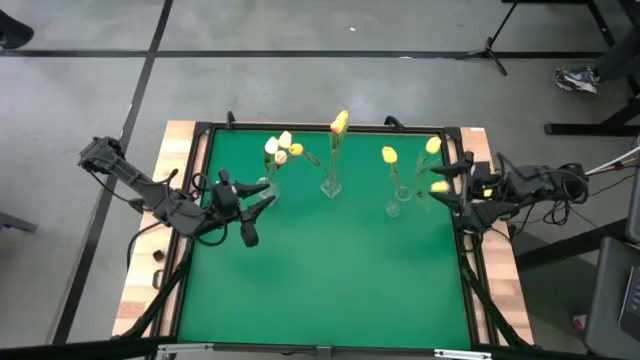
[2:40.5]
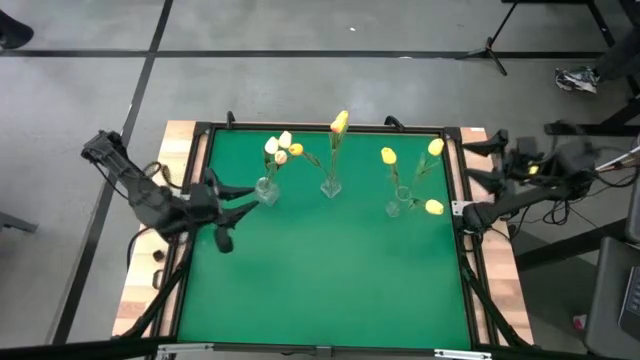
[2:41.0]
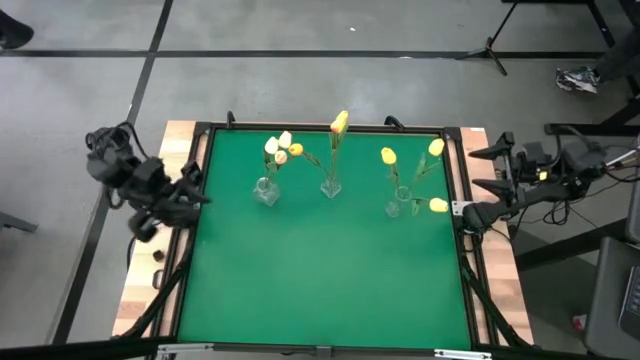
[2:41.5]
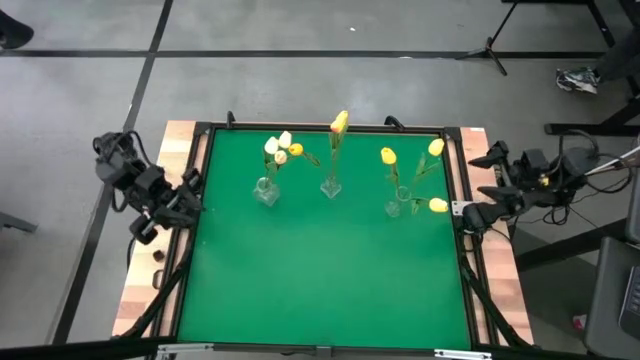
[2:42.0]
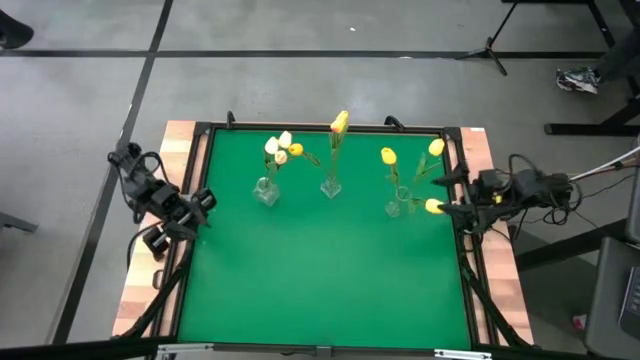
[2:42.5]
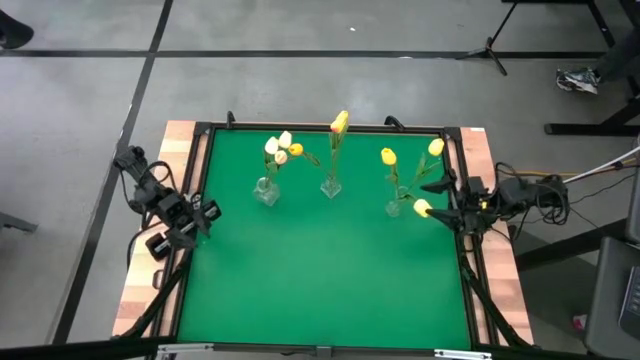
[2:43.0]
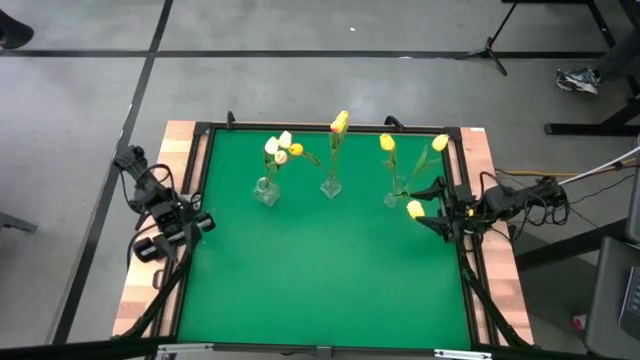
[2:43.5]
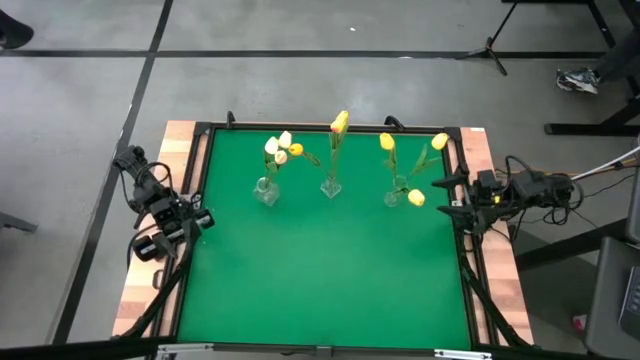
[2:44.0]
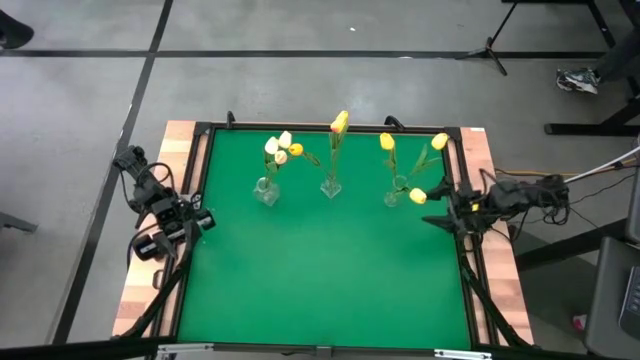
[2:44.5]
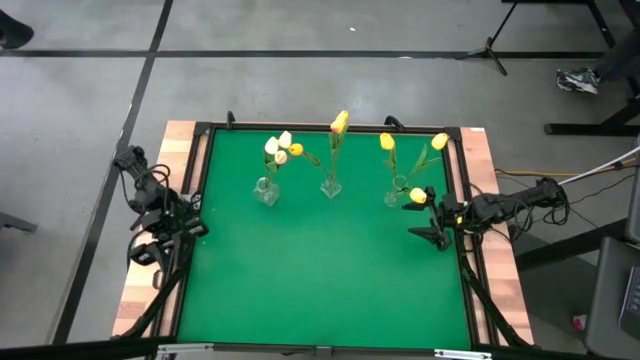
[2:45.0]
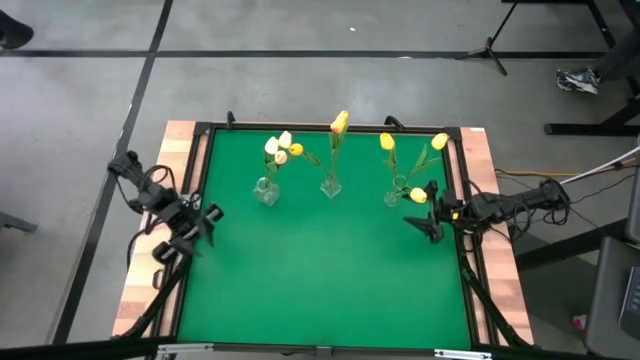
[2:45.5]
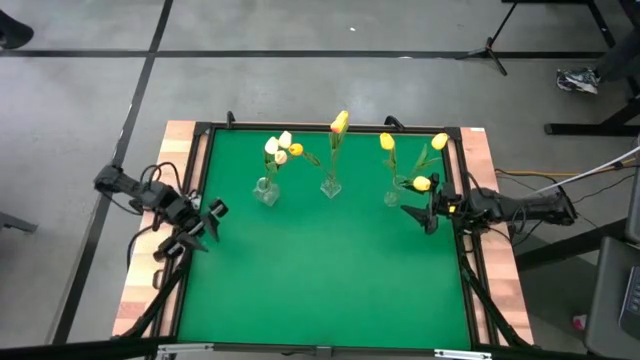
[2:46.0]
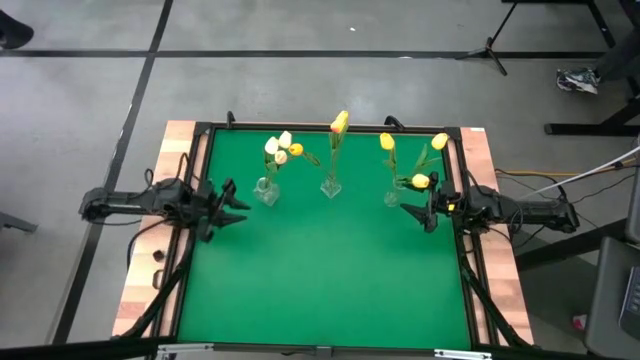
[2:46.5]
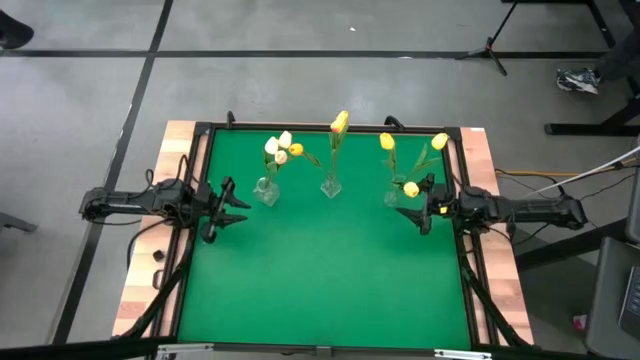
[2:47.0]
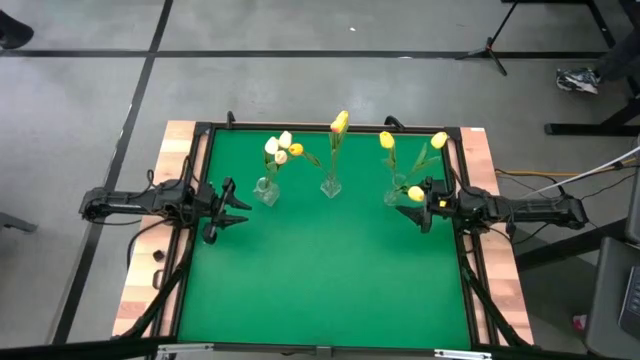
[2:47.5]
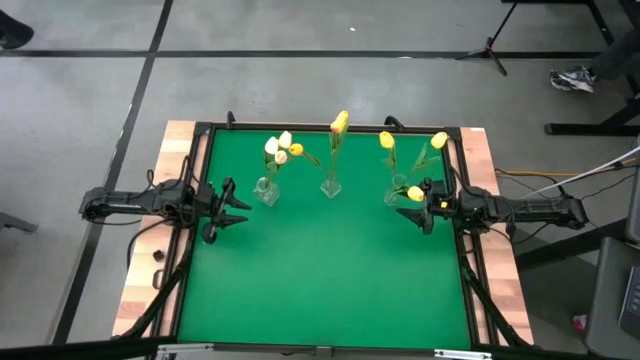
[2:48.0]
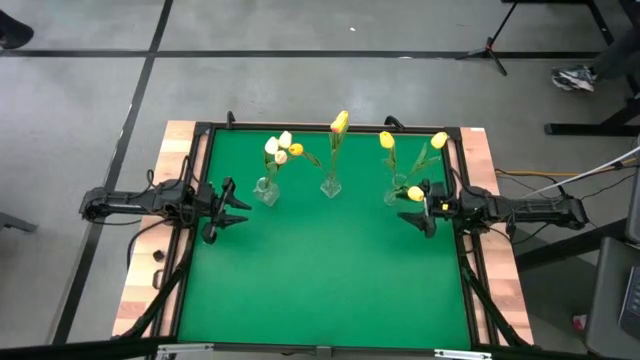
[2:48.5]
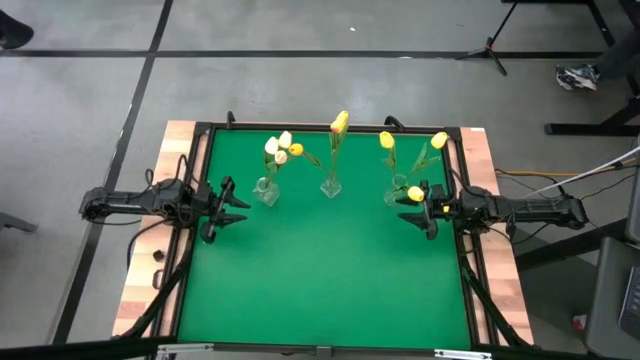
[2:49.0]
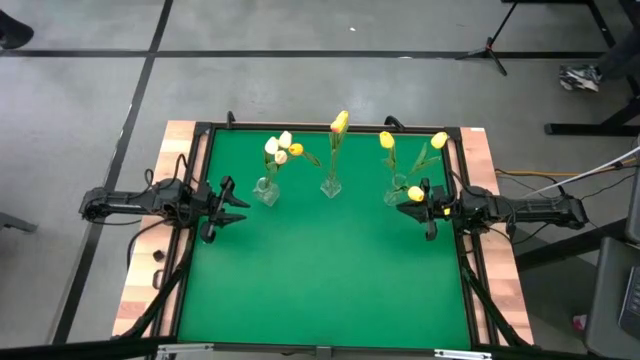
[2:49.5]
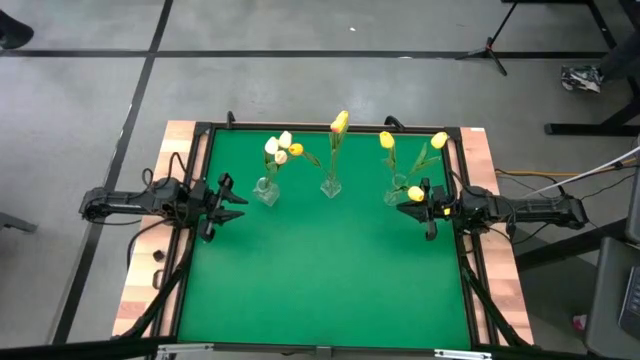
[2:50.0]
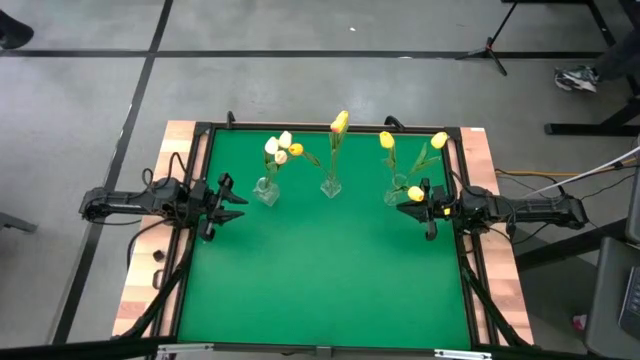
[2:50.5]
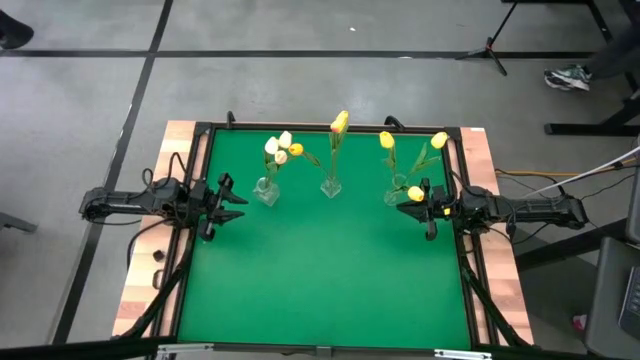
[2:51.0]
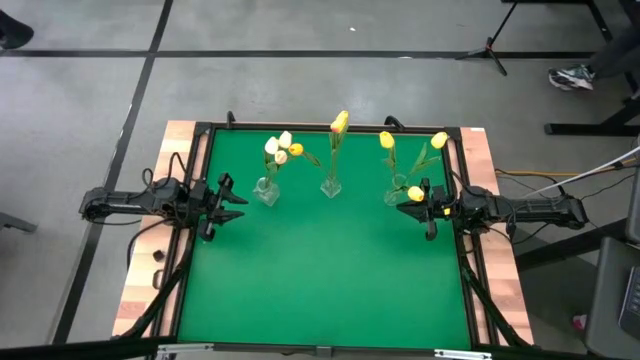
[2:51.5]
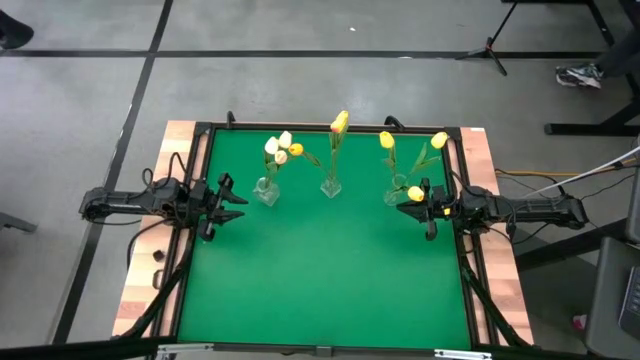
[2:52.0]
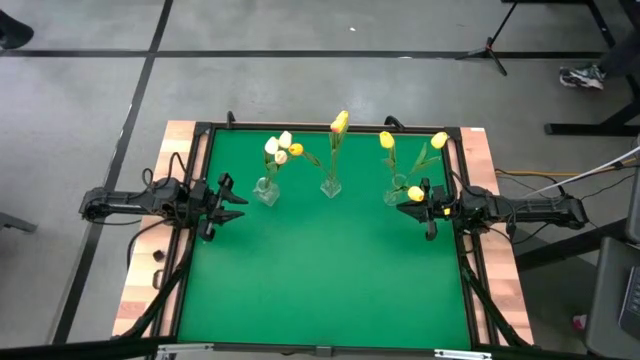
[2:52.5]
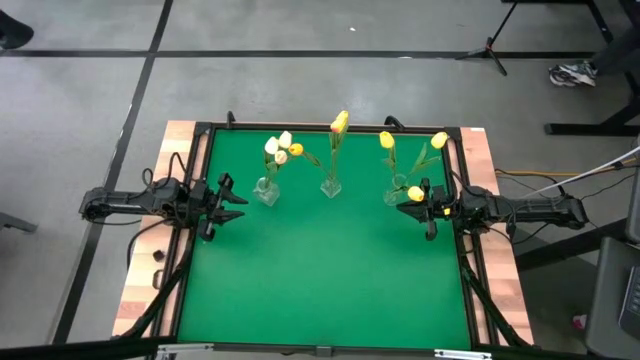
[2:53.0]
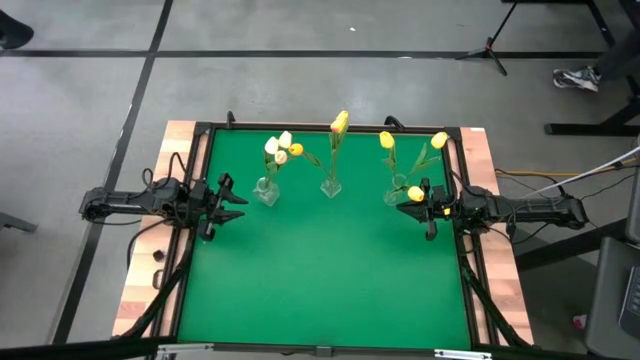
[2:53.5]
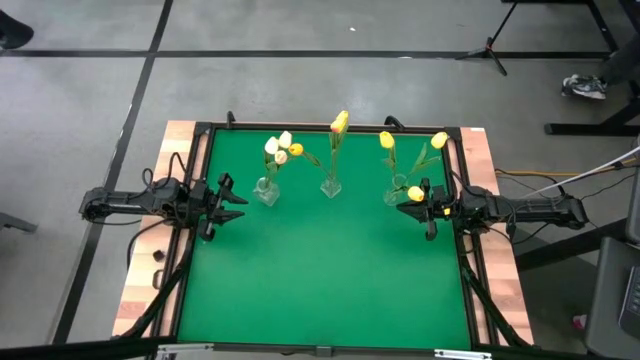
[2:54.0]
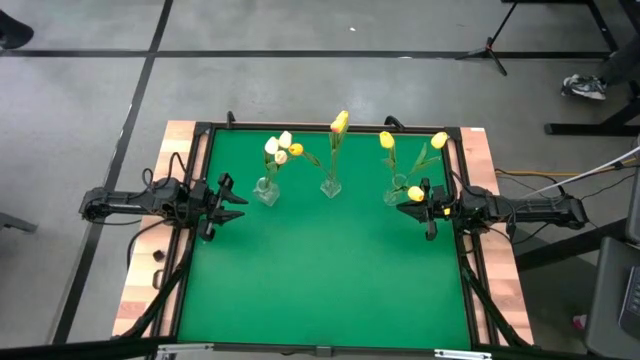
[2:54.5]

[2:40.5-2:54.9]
Task: Sort flowers into vase by color
Return to Home Position

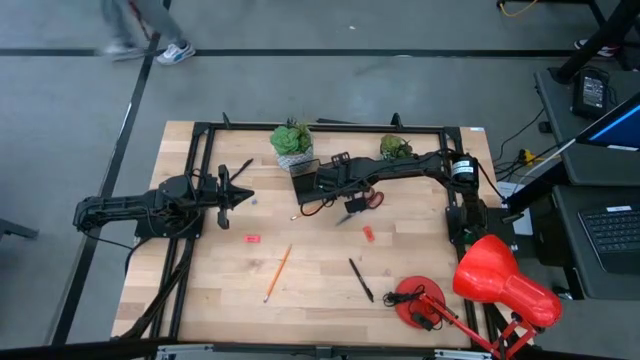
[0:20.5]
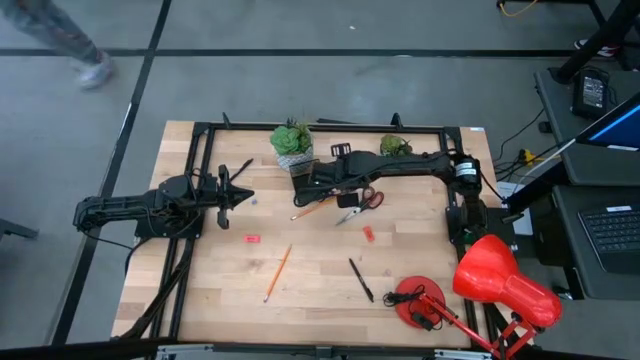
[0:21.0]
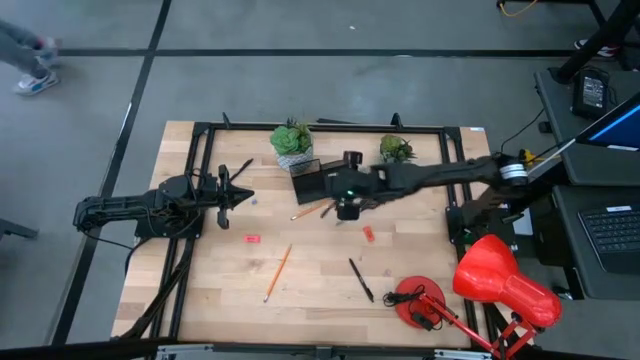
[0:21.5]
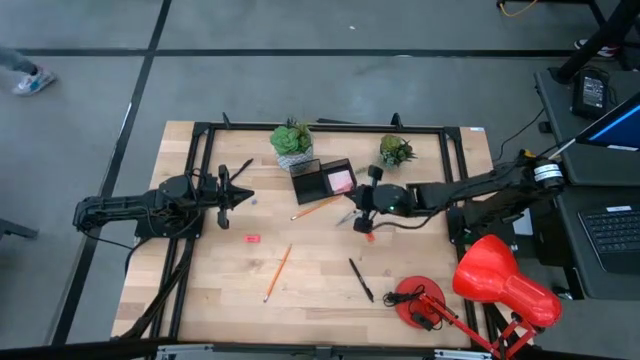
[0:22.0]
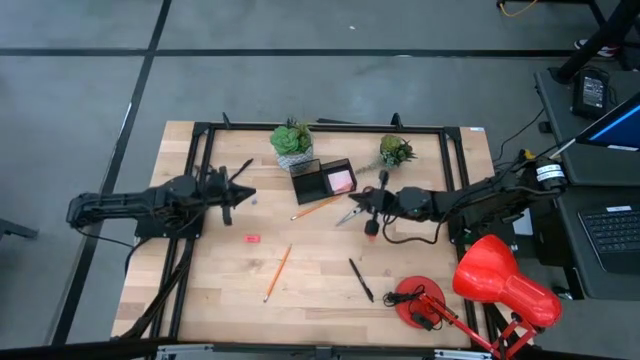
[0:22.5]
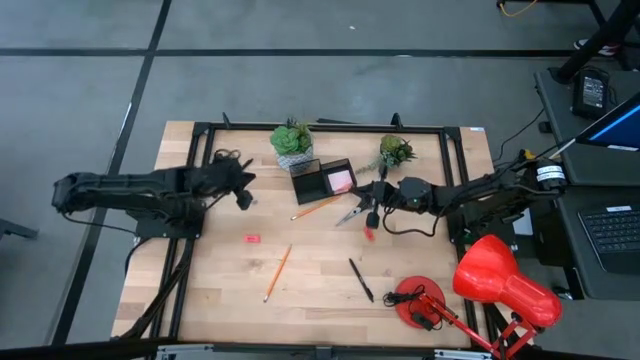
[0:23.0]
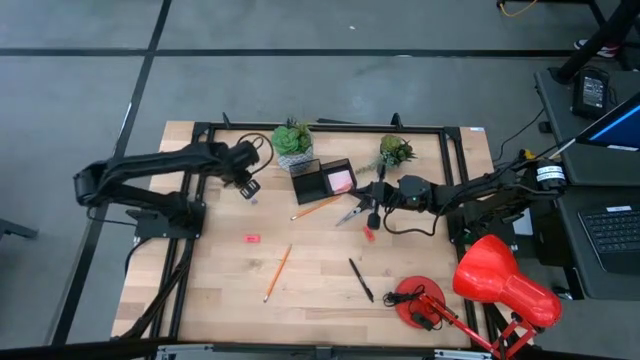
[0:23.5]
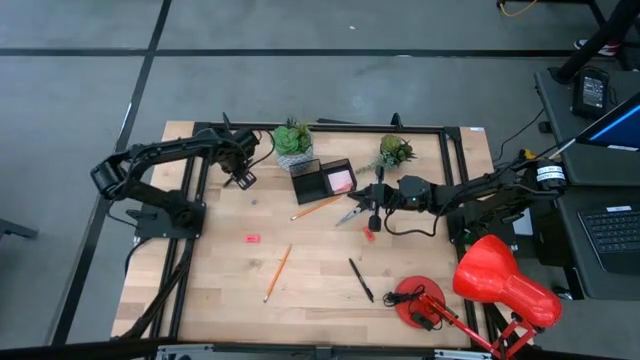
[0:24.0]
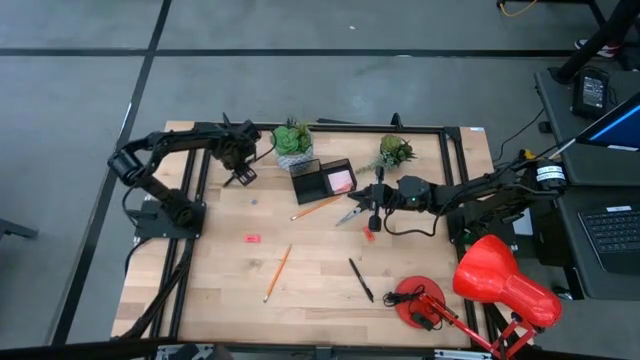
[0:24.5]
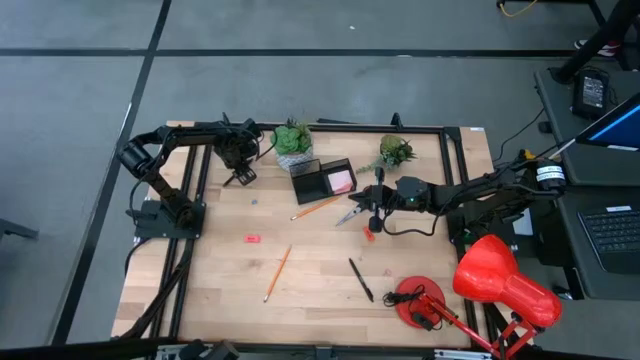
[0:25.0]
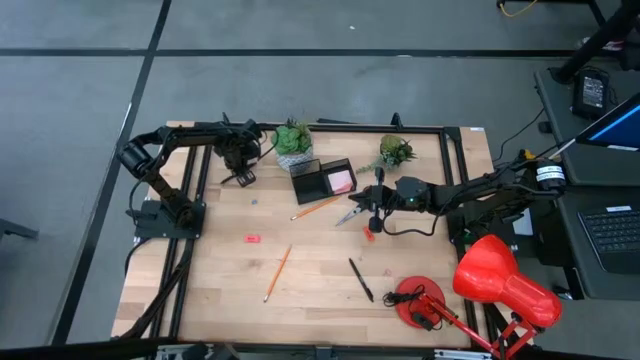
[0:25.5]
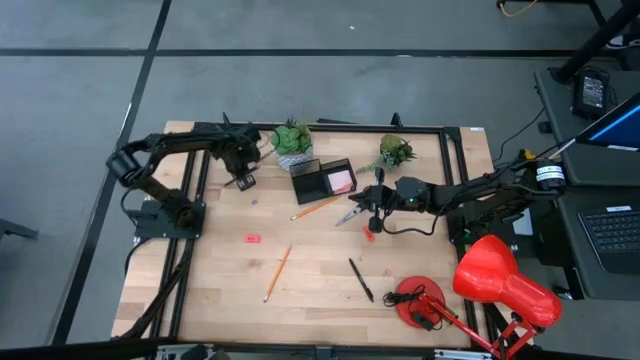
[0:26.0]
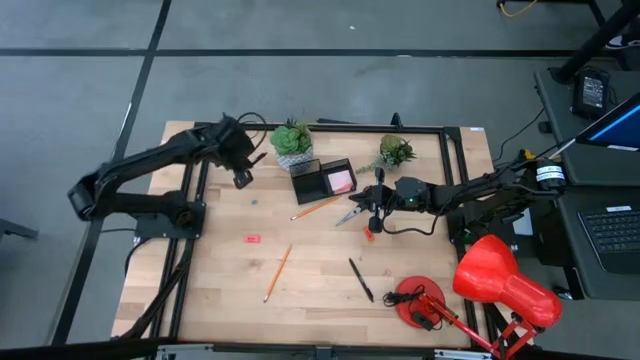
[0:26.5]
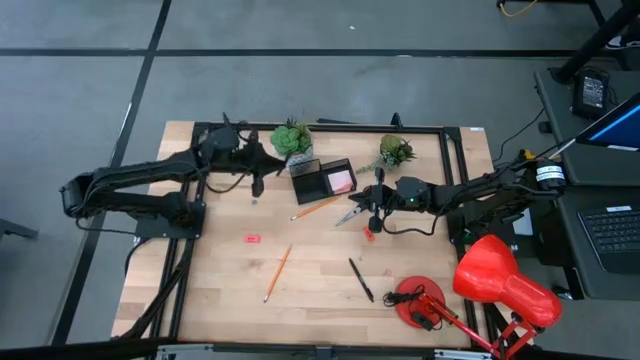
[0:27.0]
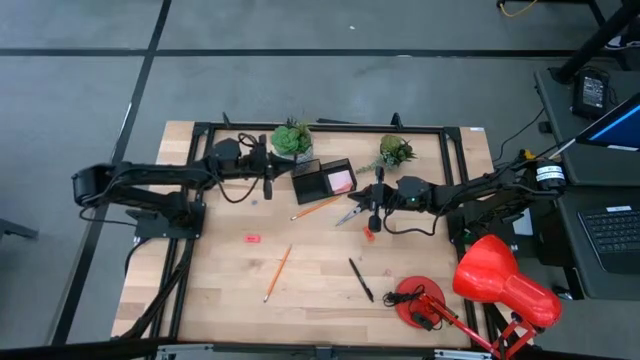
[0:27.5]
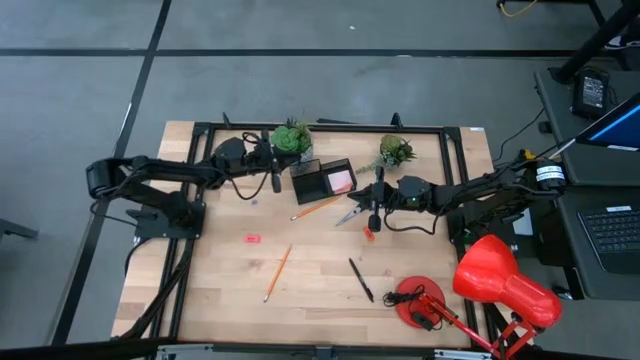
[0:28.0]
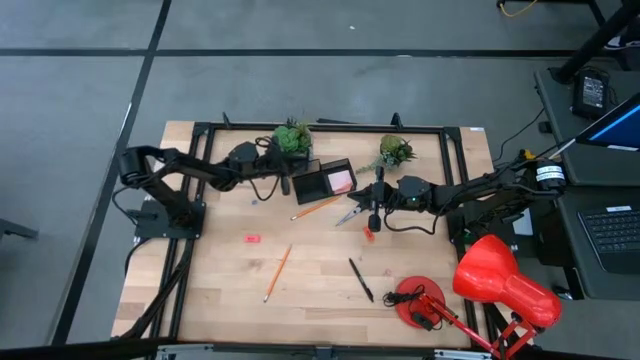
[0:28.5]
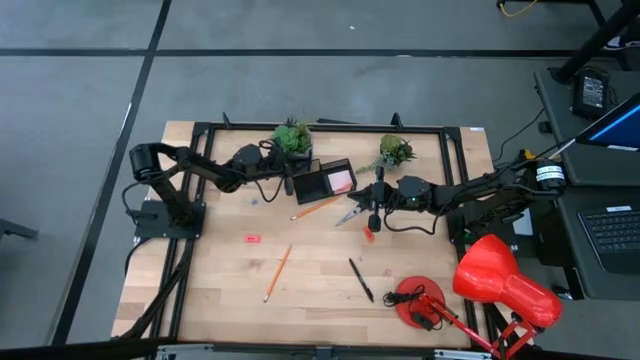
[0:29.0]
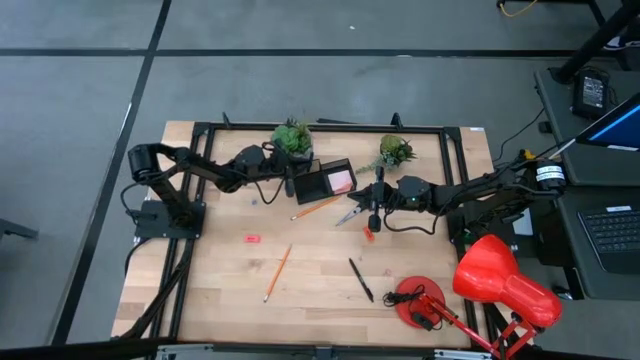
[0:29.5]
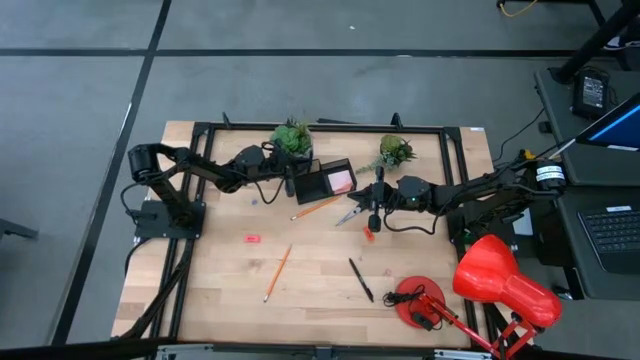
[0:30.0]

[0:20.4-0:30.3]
Task: Pick and place office supplies into organizer
Put the top black pen into the black desk organizer
